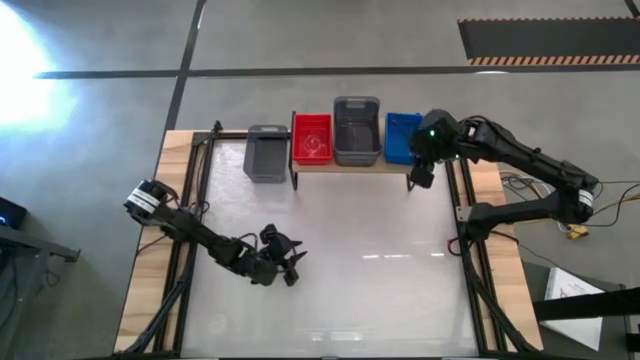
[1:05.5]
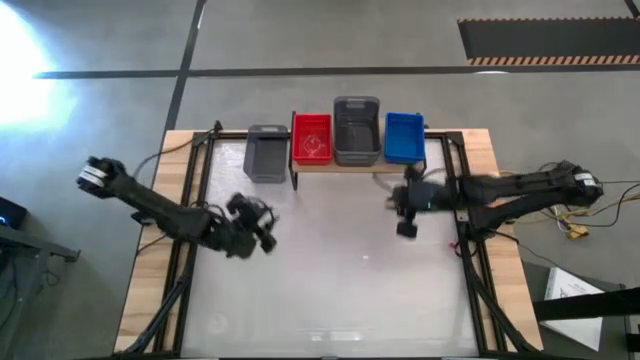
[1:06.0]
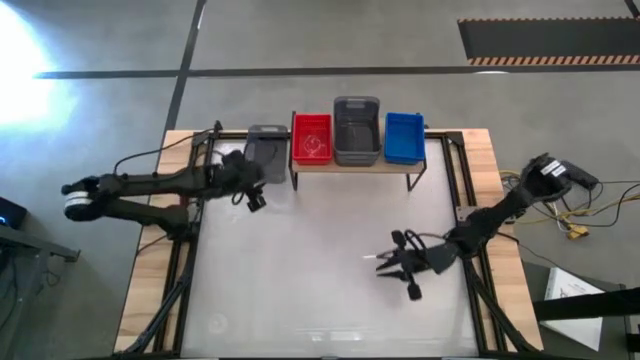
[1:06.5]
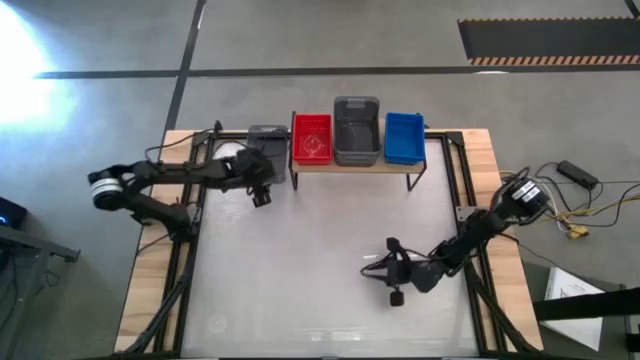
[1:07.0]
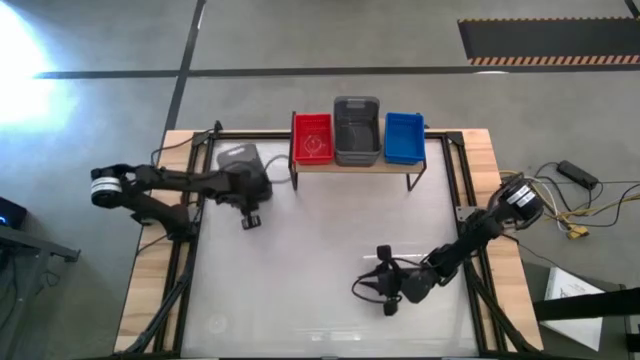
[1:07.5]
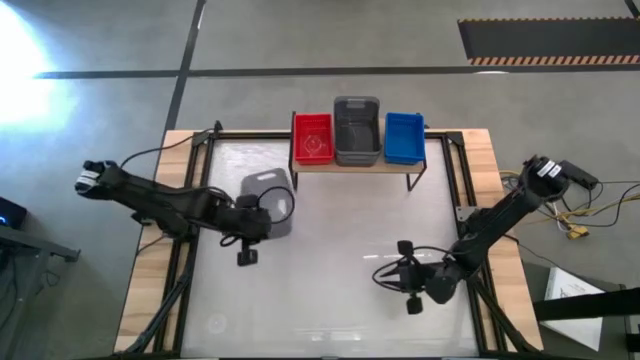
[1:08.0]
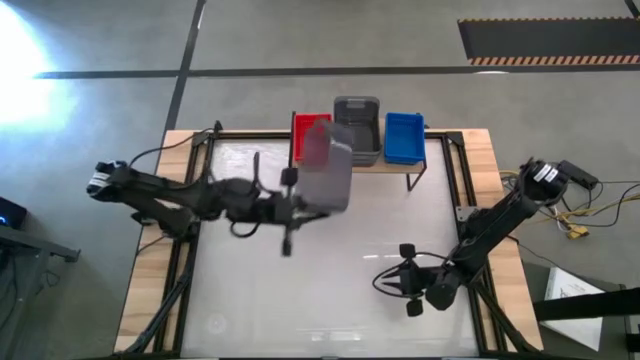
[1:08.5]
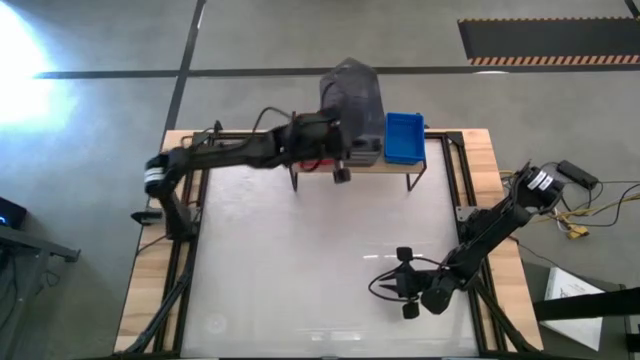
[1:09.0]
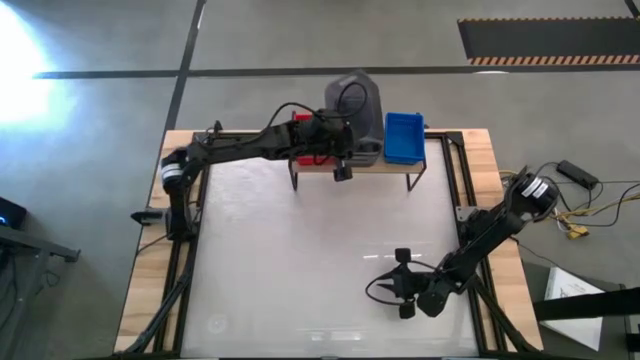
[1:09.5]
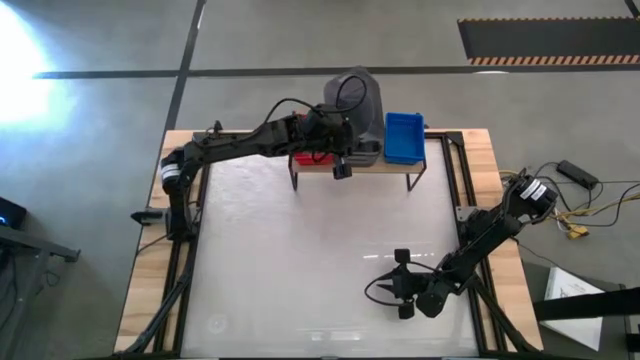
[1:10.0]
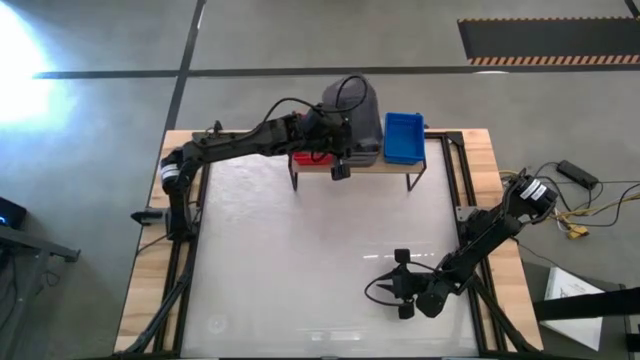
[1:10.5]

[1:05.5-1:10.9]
Task: Stack baskets on shelf by color
Stack the black bin into the black bin on the shelf

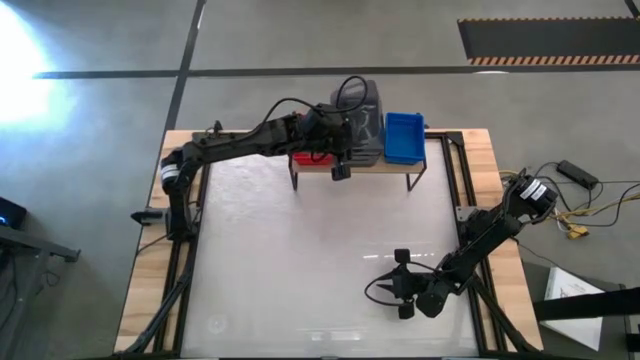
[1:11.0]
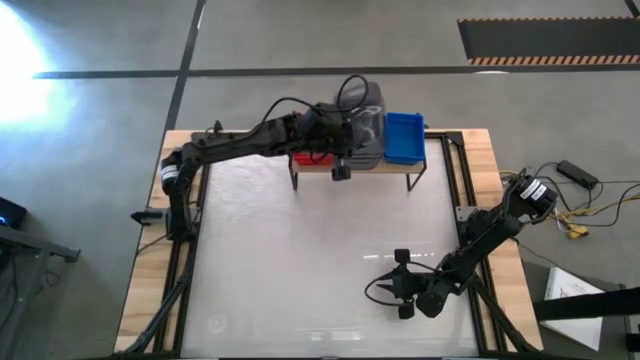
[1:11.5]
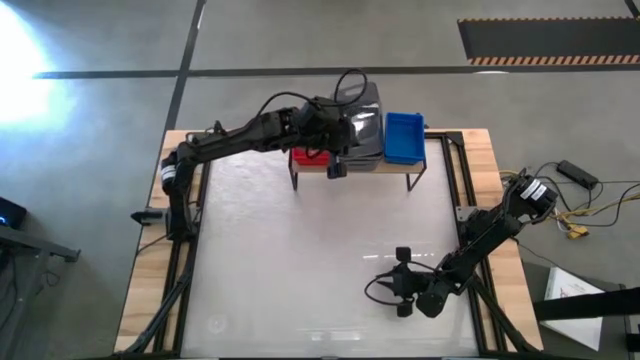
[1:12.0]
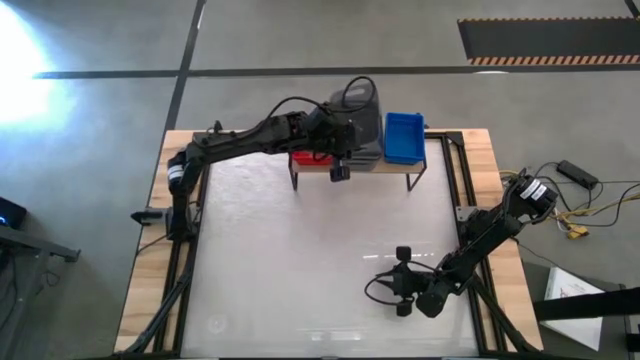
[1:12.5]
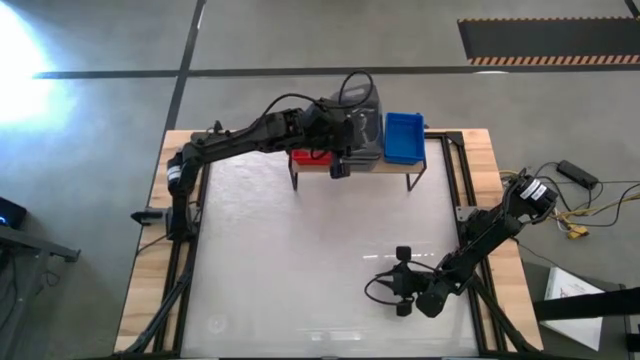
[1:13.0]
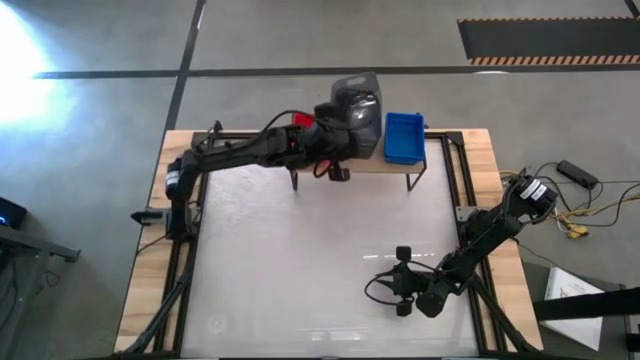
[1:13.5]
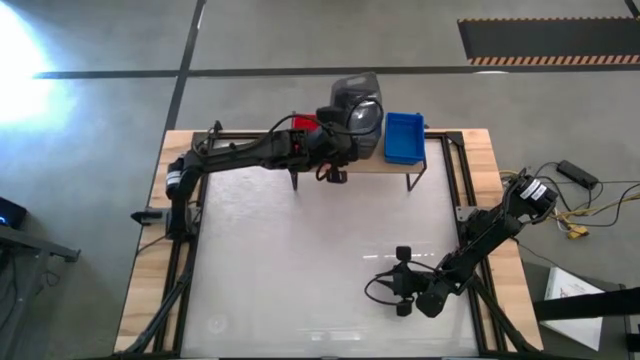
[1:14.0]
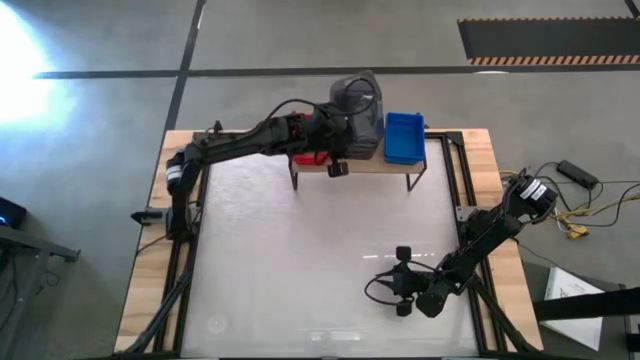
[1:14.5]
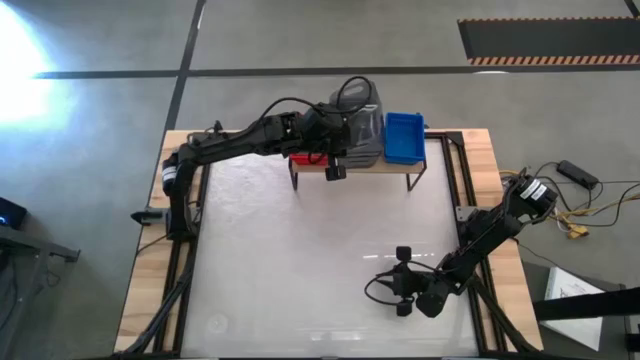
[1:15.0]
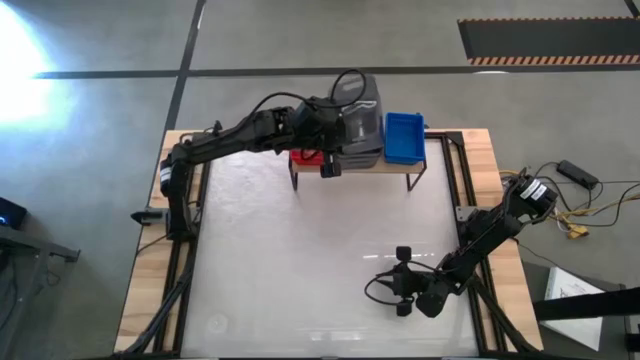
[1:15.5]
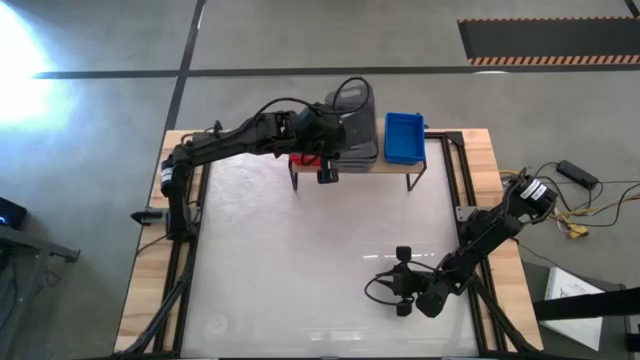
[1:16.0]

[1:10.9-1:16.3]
Stack the black bin into the black bin on the shelf

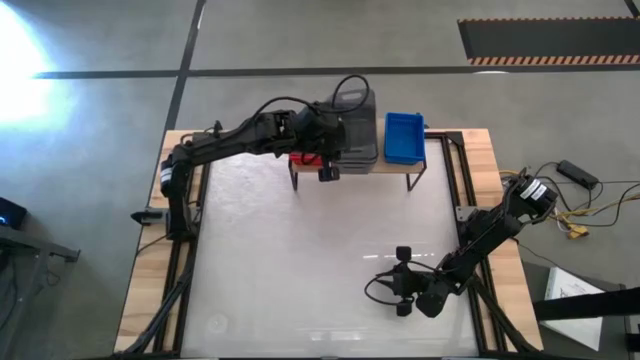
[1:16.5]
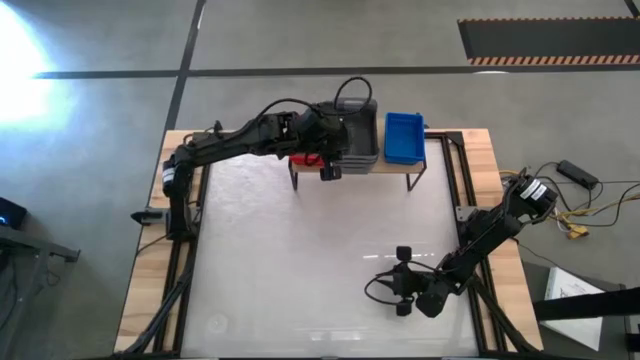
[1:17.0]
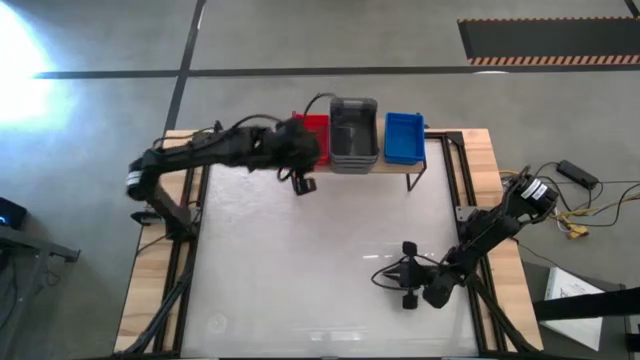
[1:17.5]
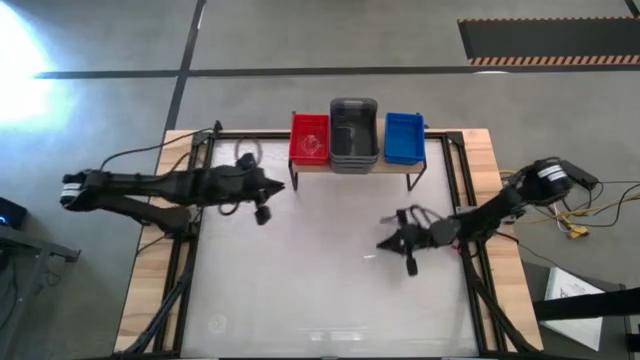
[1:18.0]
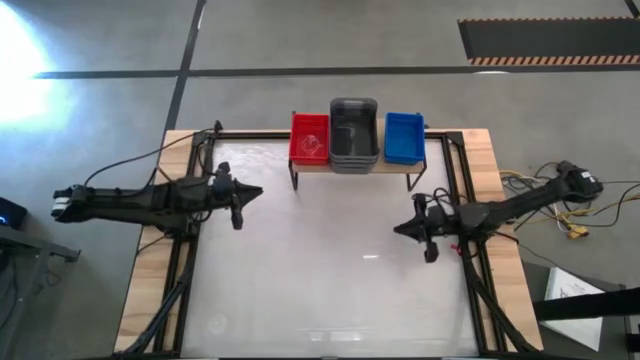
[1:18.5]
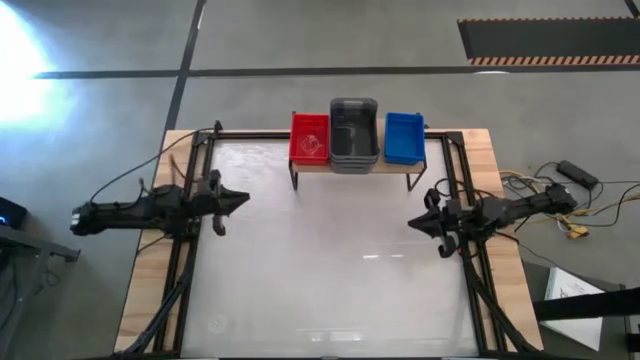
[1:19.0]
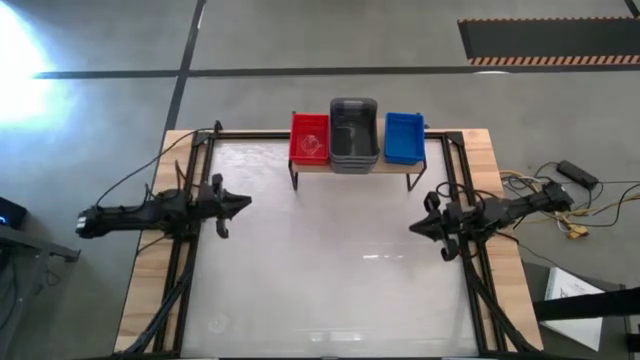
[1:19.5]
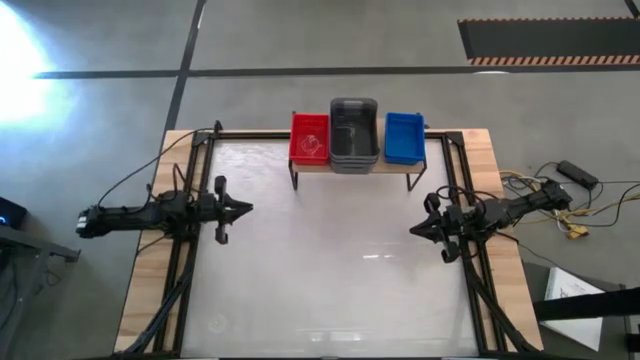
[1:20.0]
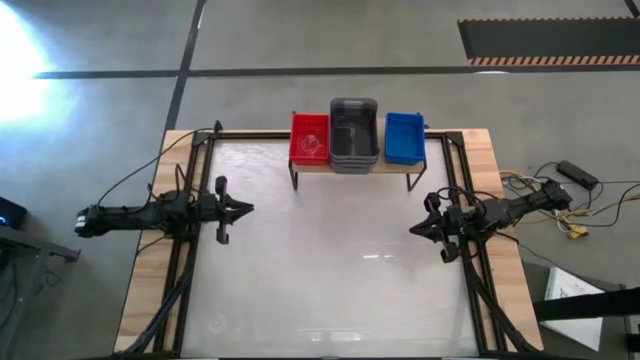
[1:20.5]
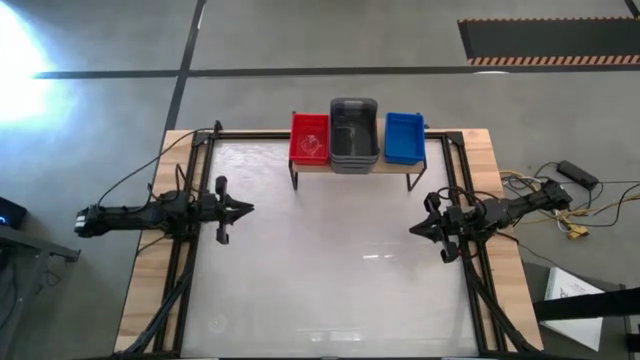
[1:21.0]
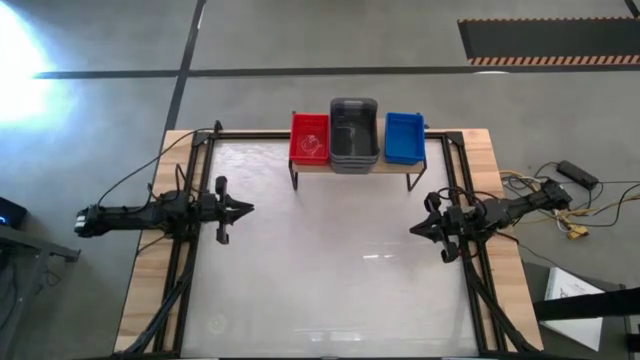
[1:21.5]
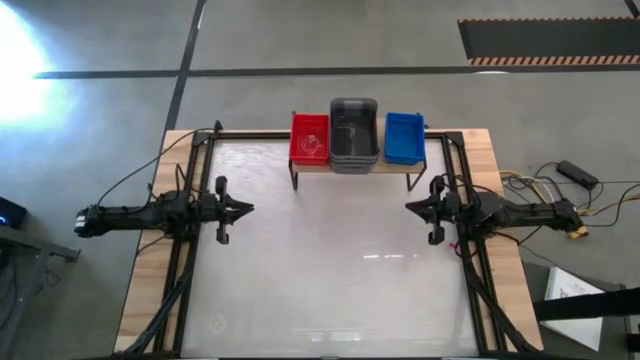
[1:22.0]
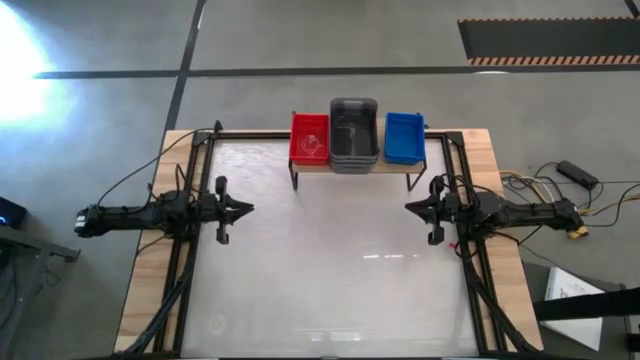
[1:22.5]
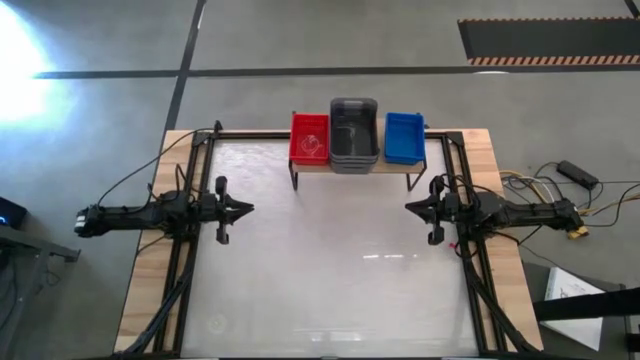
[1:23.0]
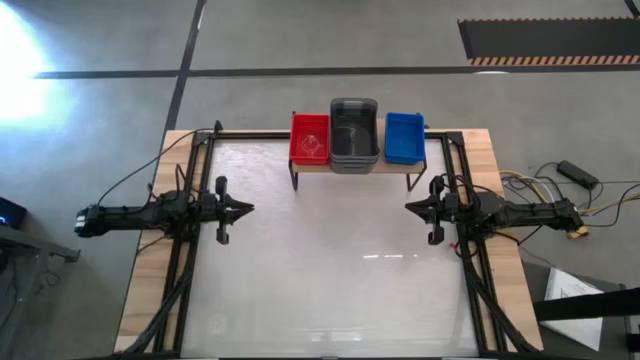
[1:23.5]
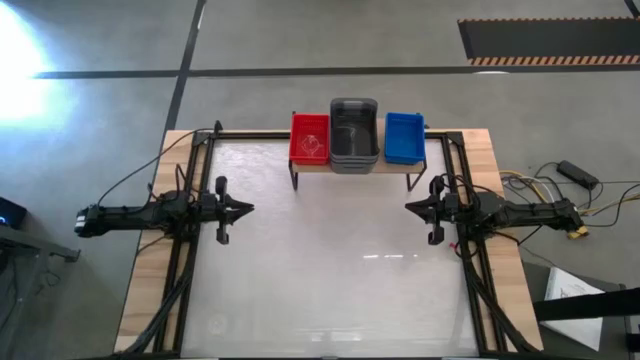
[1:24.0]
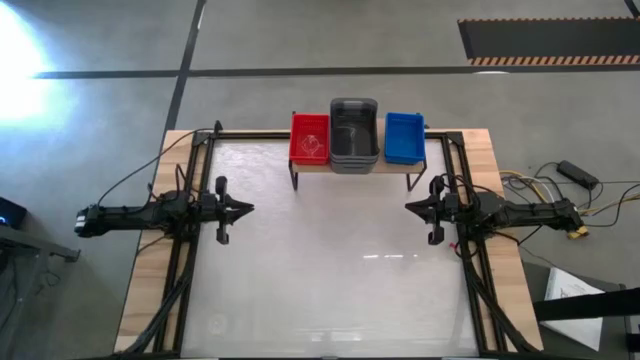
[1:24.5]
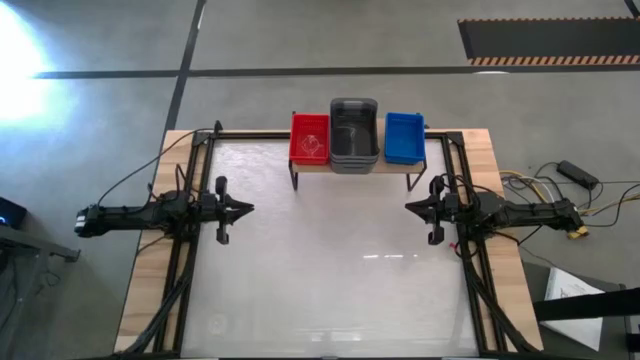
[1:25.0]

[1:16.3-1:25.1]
Return to Home Position

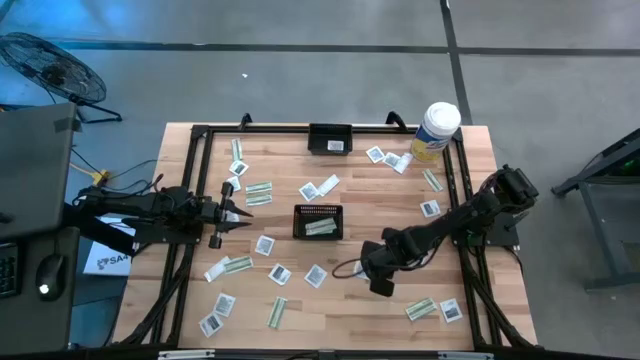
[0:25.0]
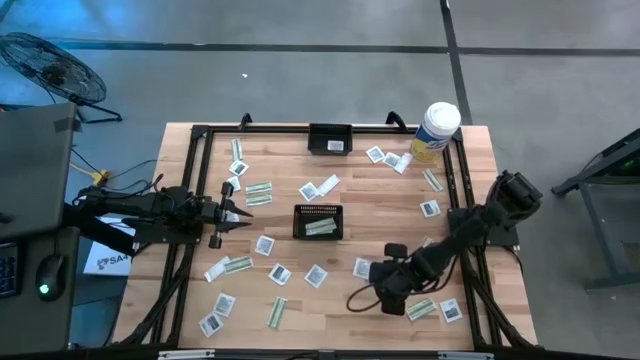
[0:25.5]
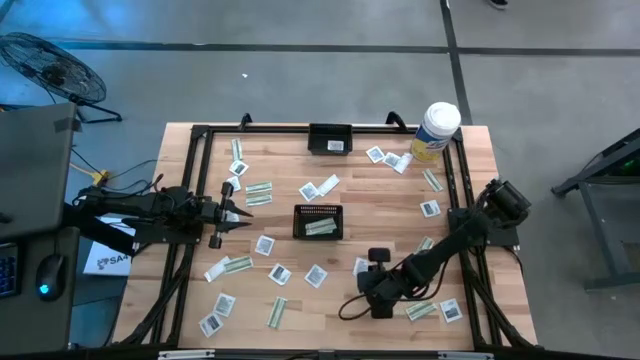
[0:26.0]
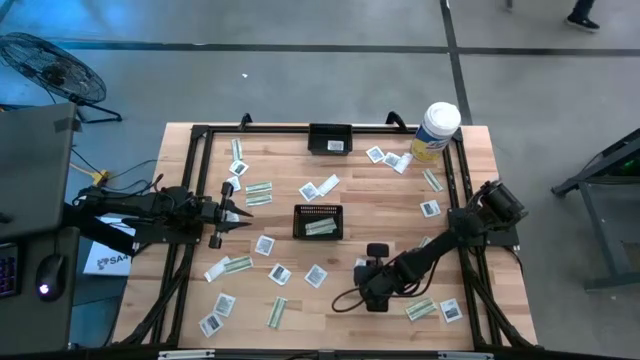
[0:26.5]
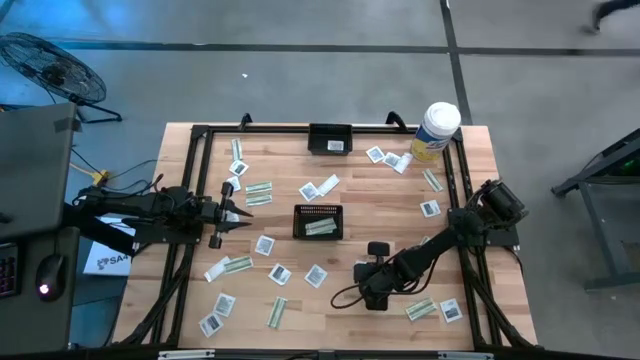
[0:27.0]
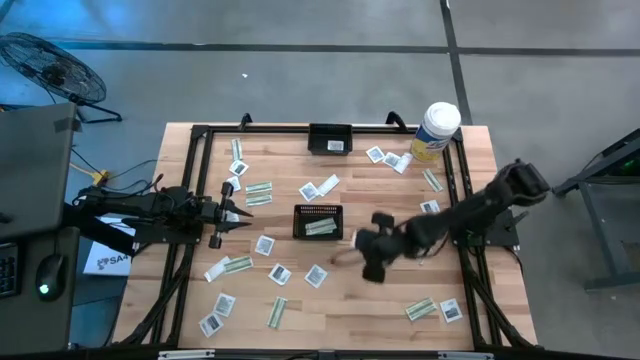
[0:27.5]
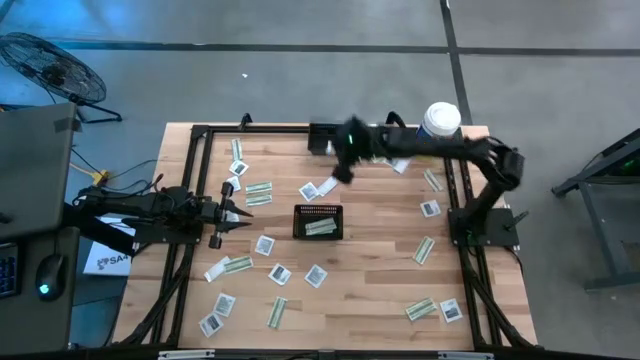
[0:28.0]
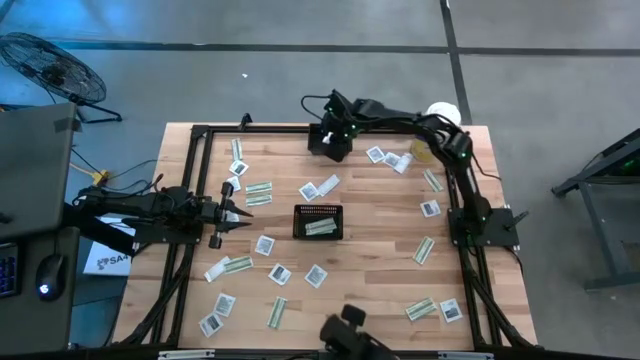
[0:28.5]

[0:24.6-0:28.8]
Task: Pick & Place First Aid Supplies
Put the towelette pack into the top black basket
